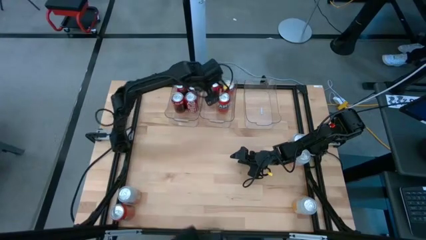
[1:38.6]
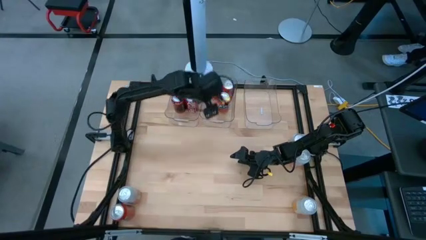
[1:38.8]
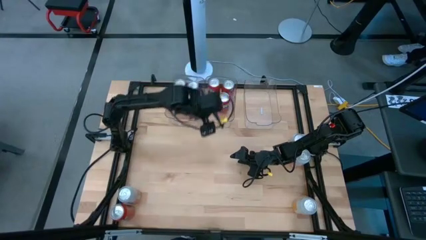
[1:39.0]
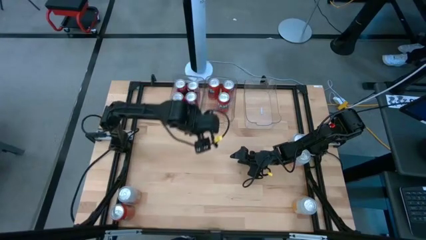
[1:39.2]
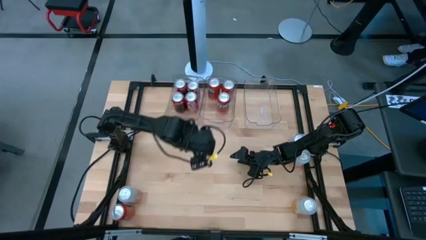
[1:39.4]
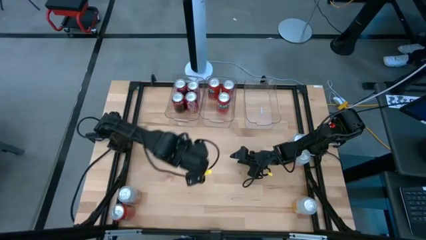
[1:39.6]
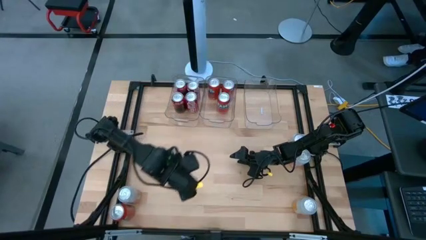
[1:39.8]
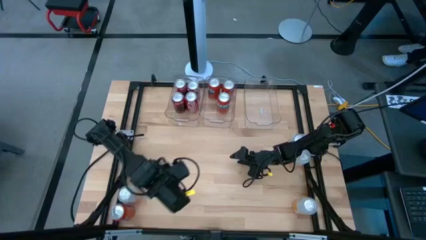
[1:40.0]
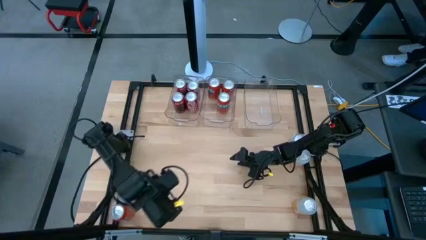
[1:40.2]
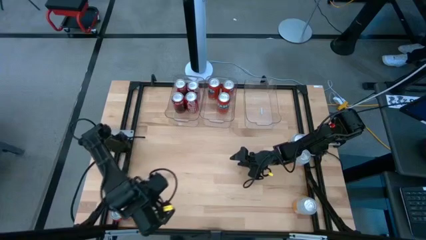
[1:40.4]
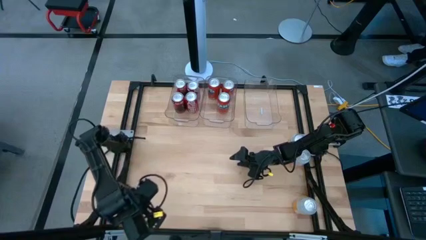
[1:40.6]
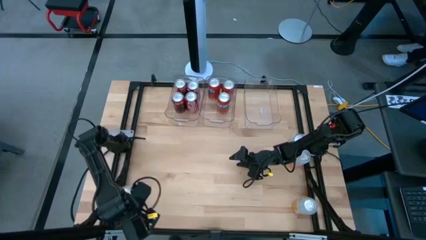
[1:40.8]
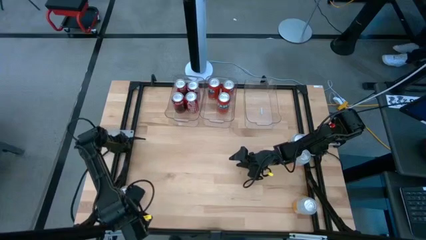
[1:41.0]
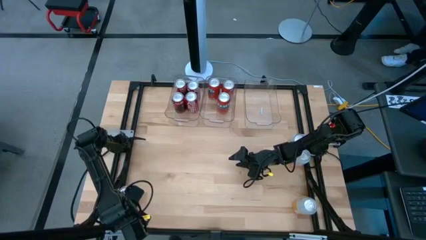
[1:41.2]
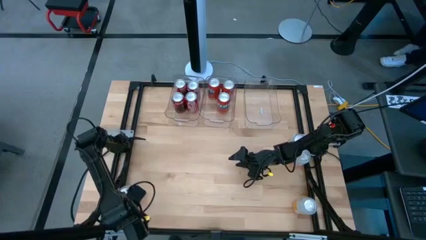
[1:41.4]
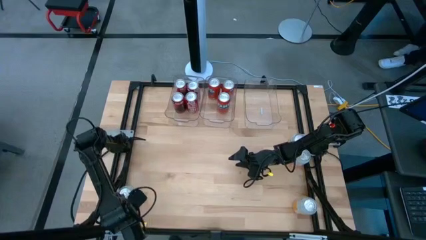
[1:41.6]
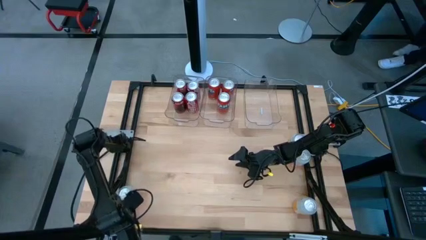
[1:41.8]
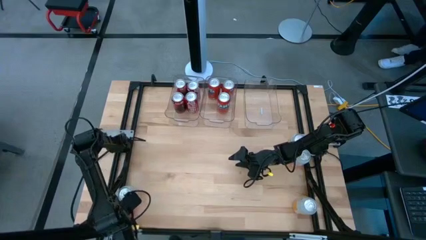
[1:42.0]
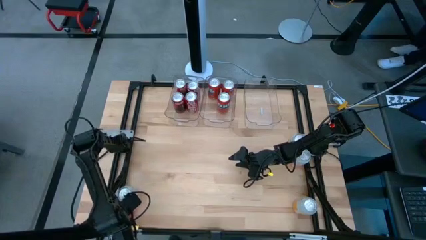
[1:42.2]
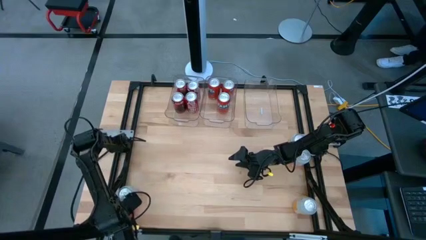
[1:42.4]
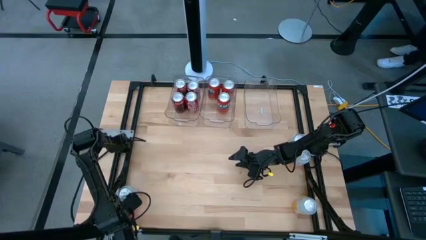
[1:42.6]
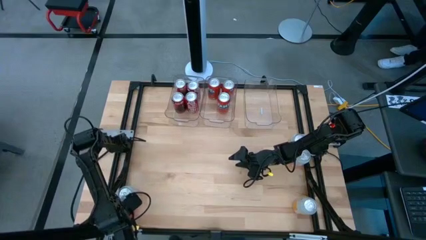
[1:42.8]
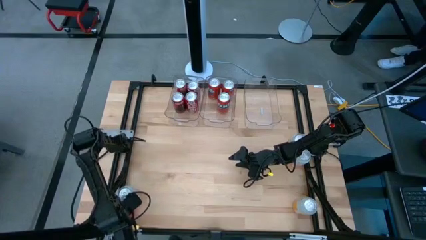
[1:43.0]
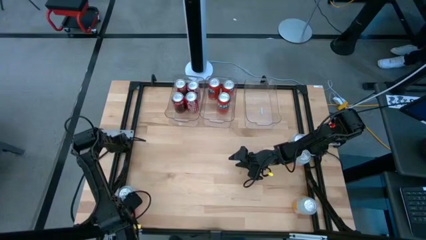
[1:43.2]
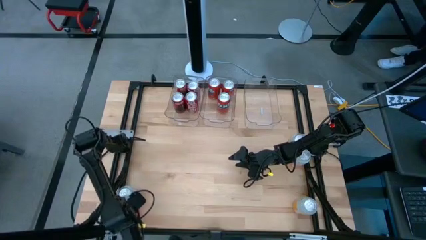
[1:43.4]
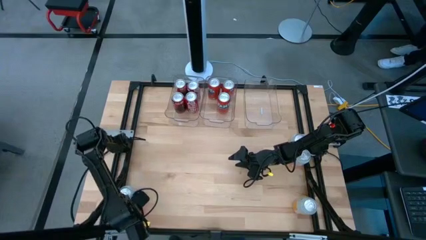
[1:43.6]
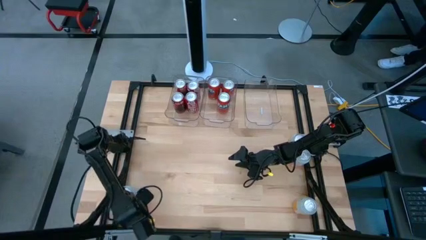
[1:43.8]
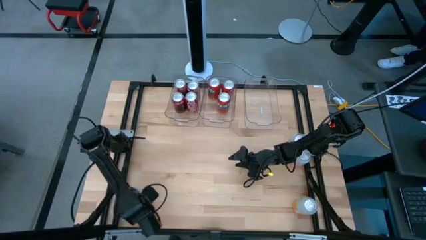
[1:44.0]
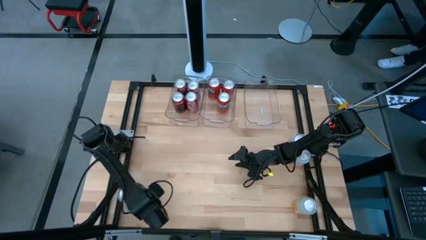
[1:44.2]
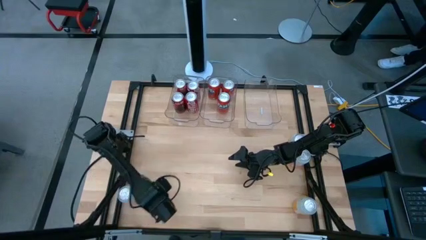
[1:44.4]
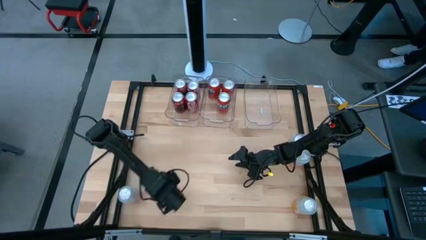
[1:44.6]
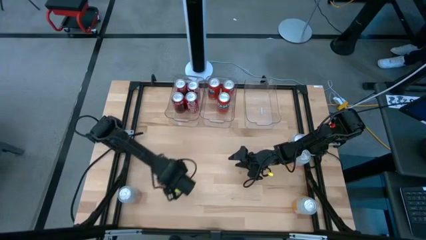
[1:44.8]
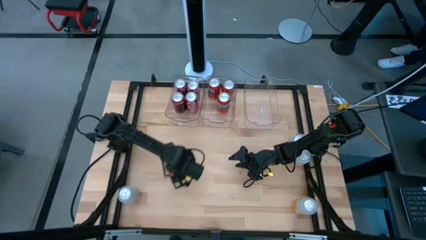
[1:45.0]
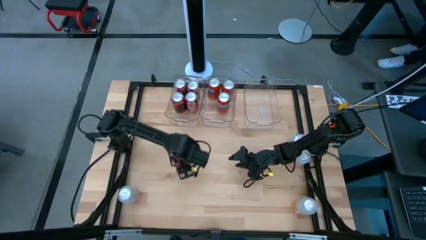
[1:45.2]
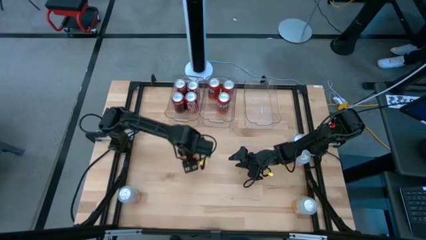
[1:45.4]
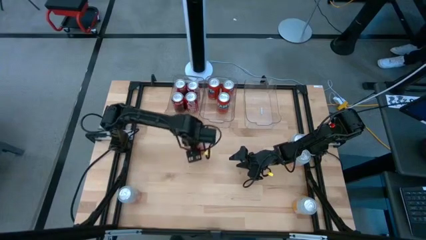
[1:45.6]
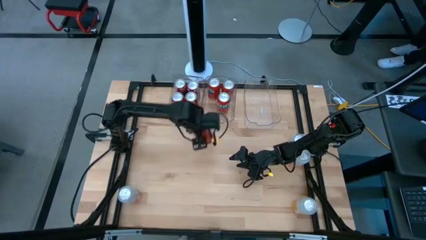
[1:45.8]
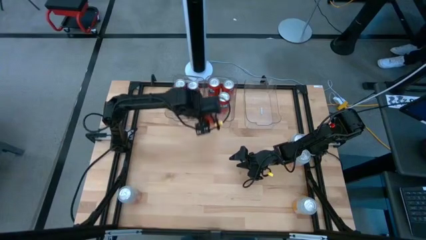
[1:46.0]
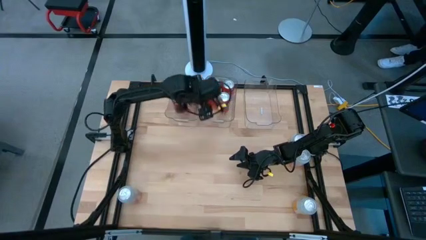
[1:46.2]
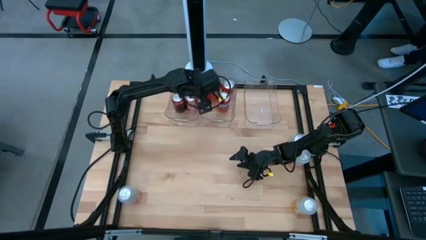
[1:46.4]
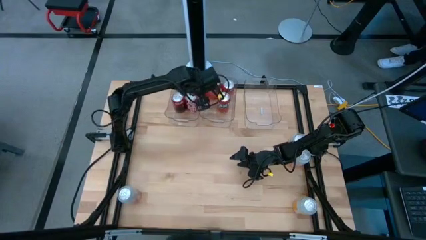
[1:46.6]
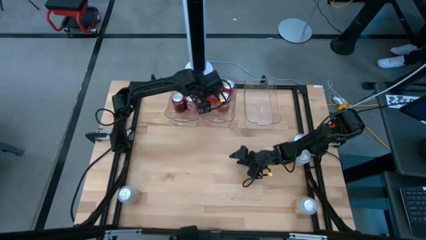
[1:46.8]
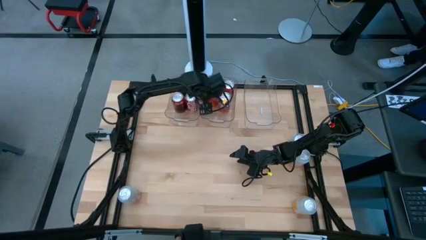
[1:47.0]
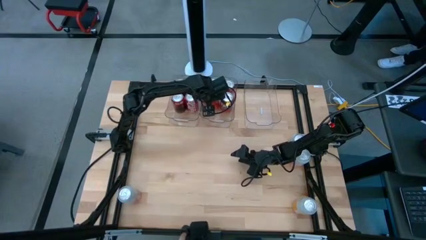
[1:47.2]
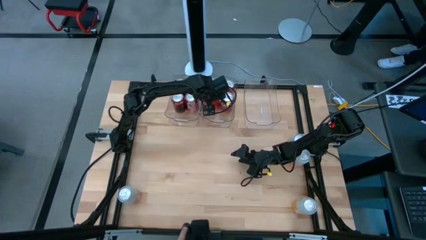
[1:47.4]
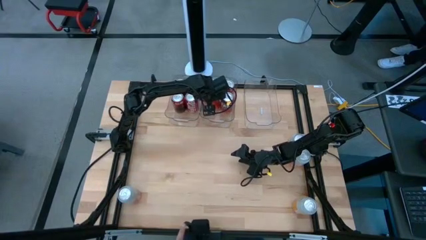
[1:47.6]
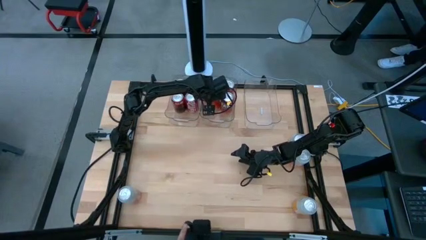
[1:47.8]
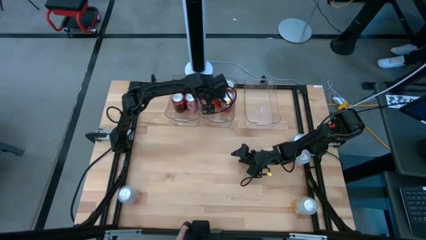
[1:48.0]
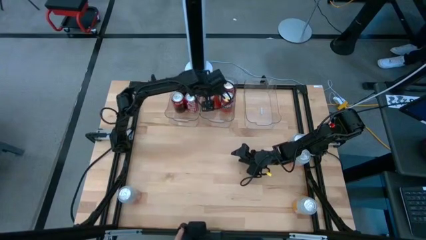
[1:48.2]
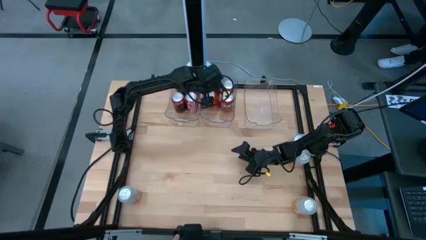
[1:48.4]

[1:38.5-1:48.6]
Task: Sort soda cans
Put the orange soda can into the middle transparent bin

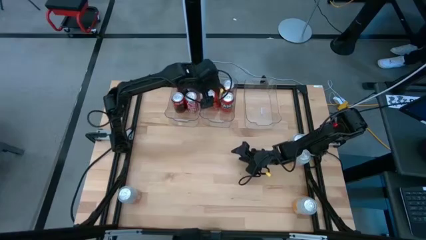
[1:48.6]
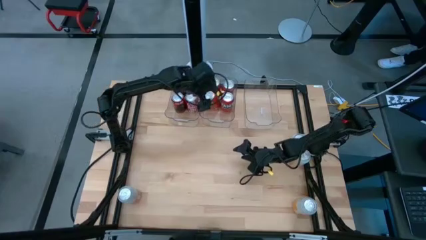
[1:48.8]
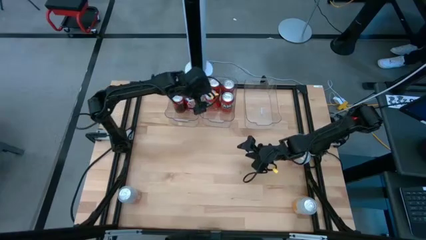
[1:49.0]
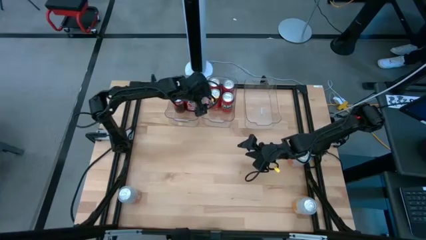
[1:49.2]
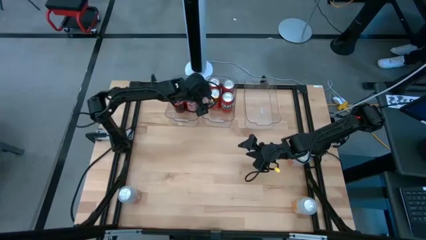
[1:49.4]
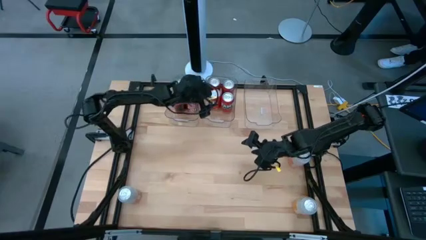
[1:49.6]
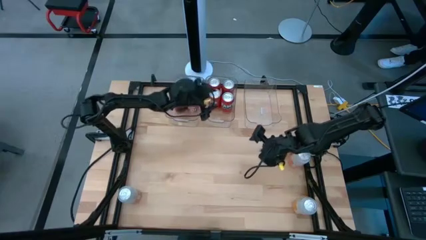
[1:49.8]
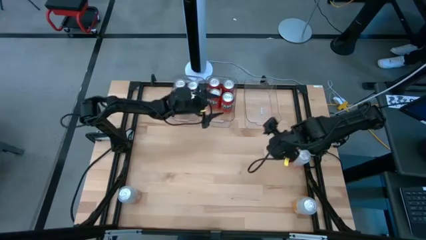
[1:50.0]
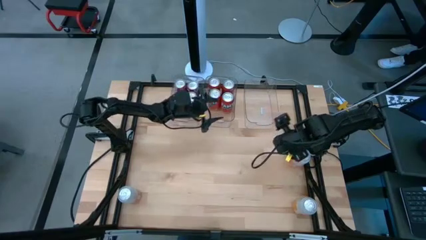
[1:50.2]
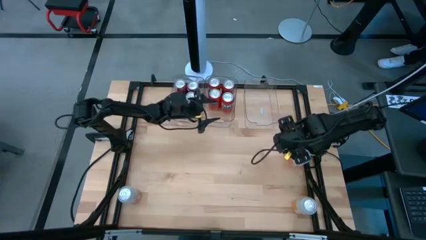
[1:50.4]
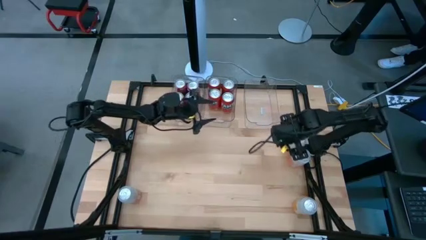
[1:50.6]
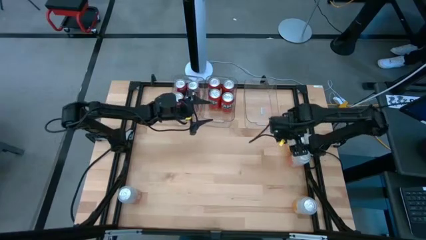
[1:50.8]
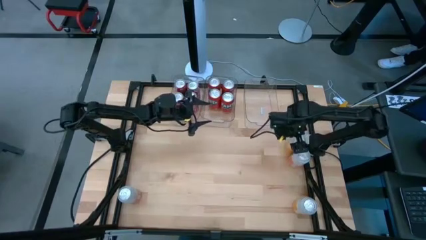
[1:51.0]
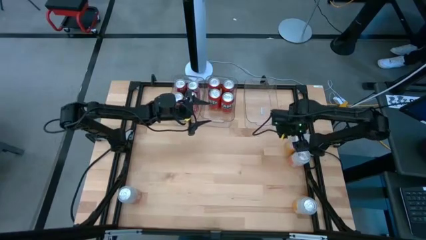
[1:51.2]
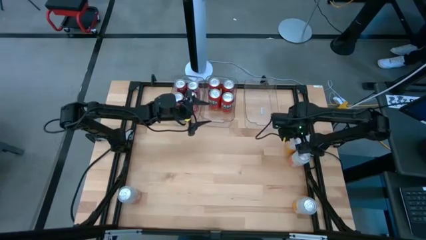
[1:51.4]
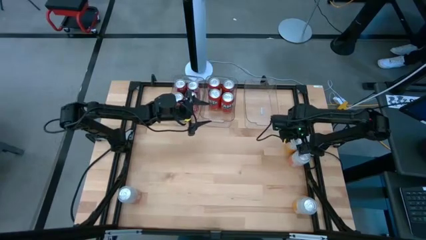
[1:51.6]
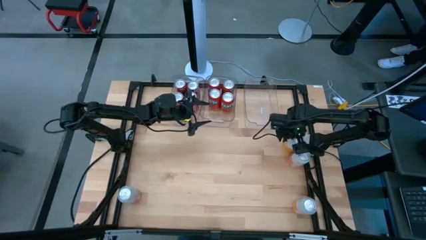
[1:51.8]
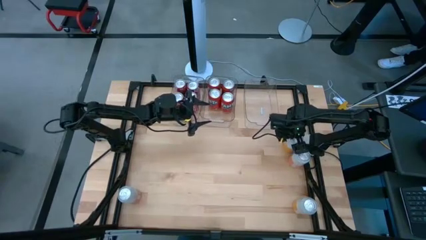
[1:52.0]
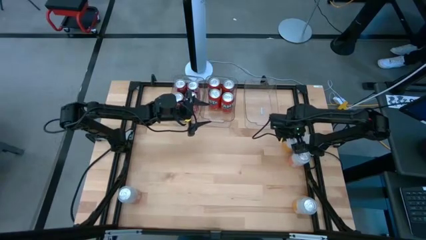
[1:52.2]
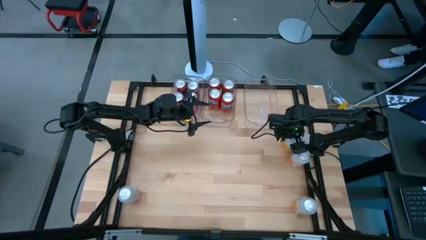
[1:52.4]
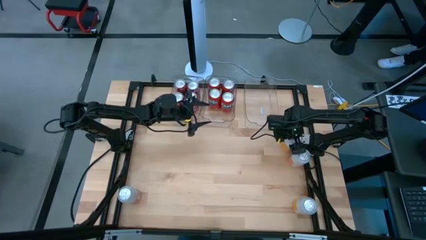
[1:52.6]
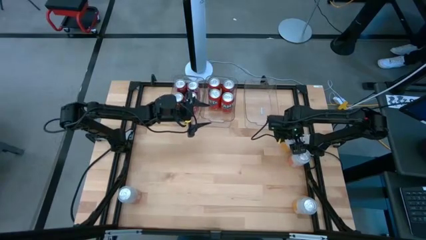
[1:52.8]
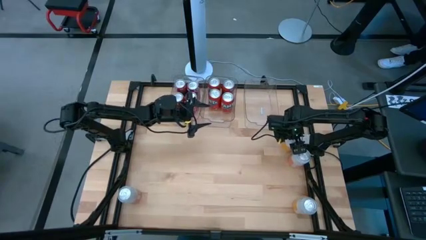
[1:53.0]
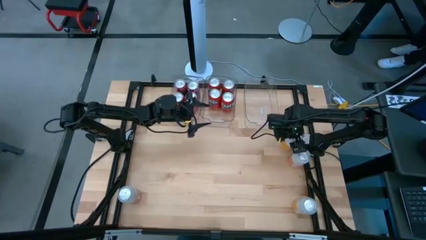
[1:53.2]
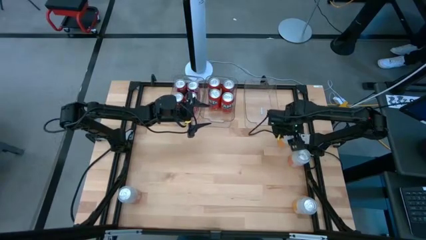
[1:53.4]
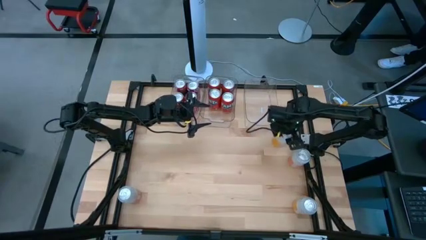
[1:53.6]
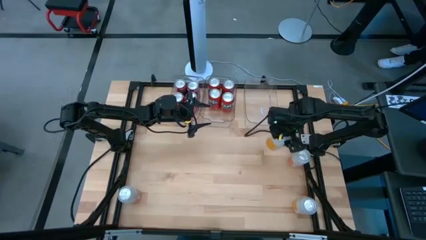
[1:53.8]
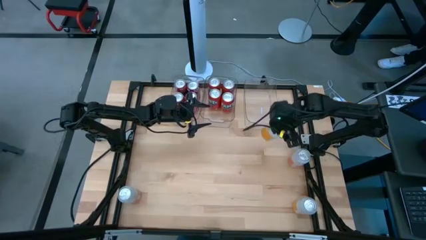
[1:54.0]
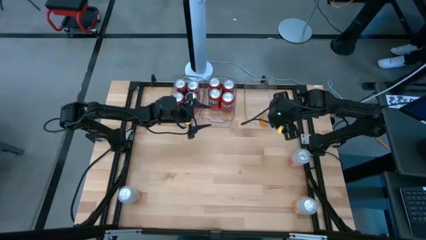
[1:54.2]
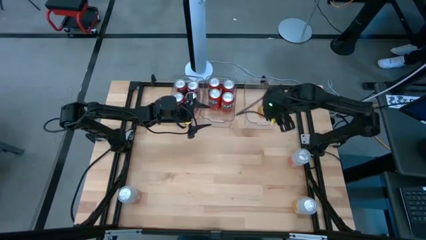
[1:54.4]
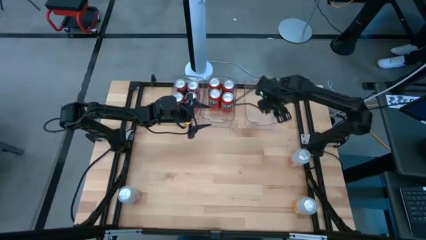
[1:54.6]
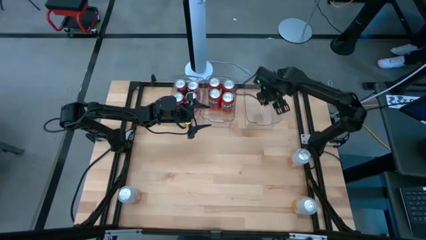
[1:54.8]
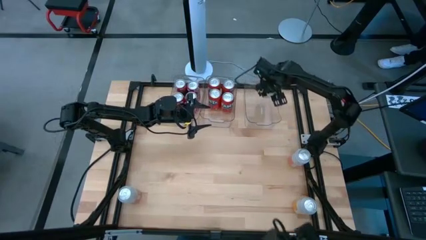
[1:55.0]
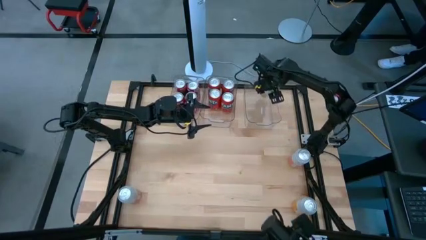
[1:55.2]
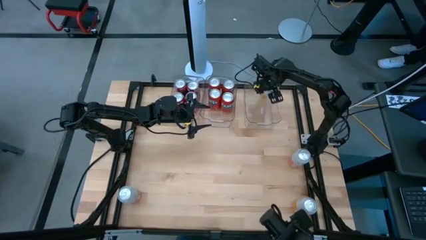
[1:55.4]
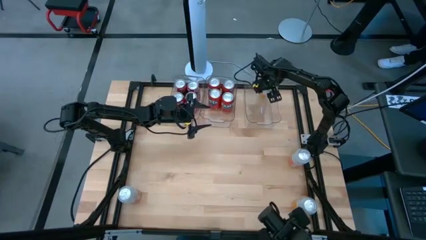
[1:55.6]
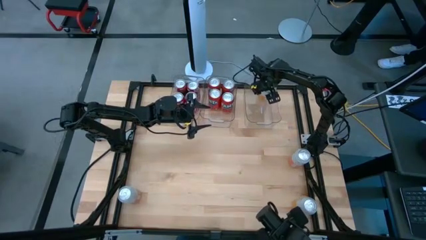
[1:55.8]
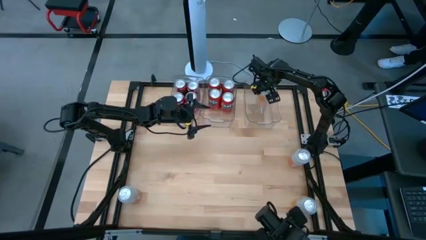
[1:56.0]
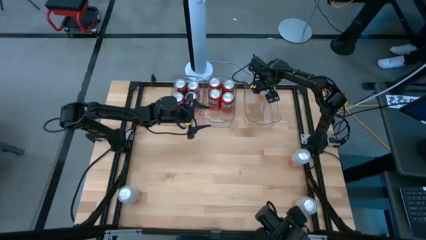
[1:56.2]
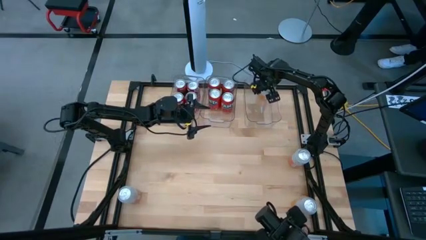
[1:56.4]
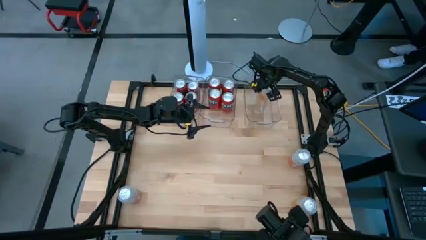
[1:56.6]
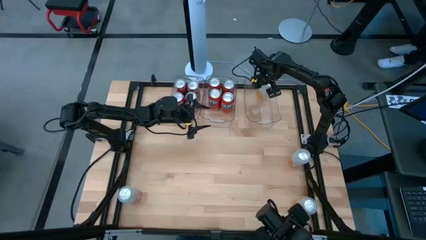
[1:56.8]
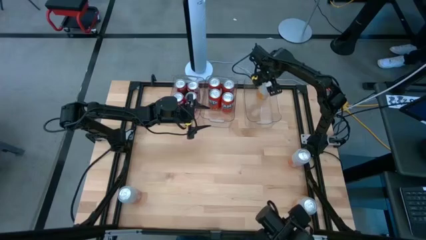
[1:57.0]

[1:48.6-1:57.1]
Put the top right middle white soda can into the right transparent bin
